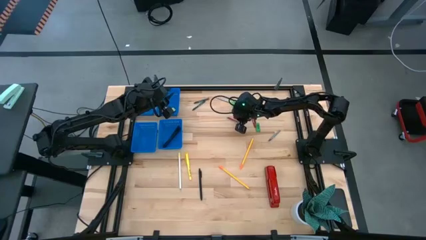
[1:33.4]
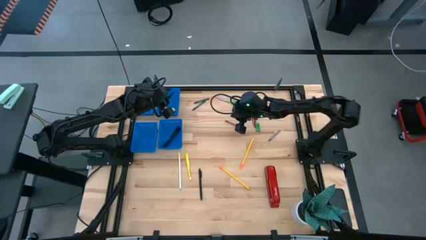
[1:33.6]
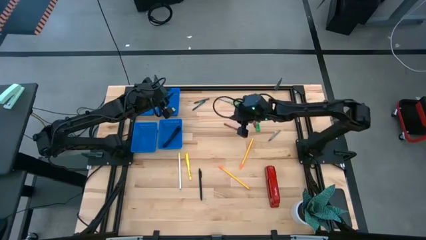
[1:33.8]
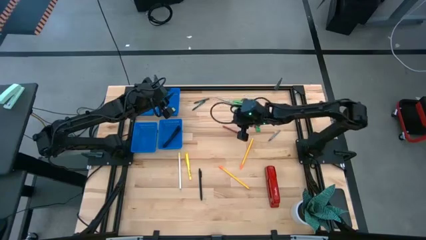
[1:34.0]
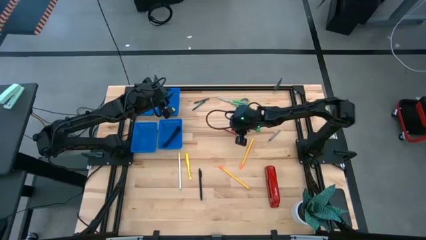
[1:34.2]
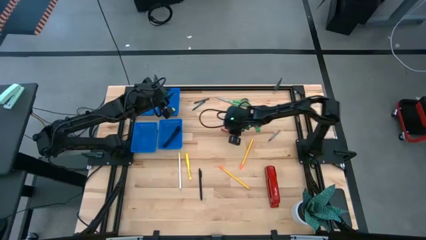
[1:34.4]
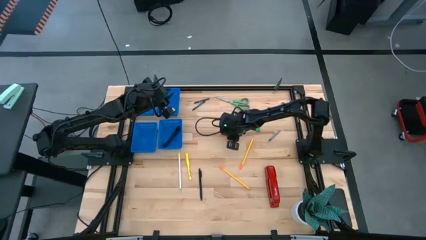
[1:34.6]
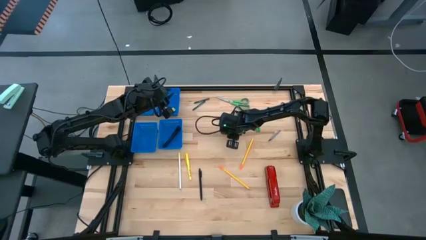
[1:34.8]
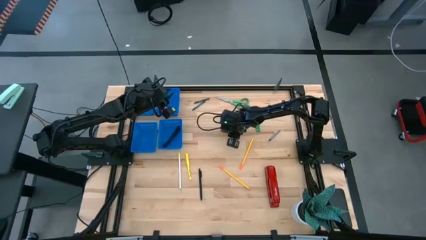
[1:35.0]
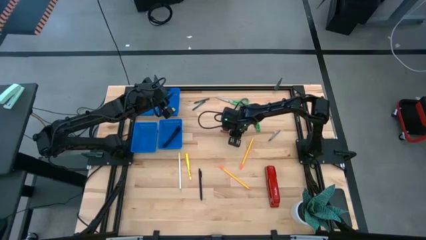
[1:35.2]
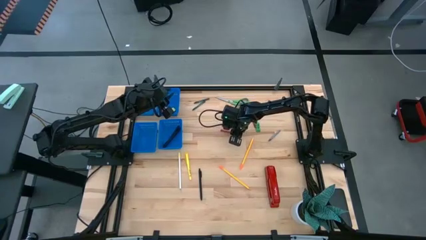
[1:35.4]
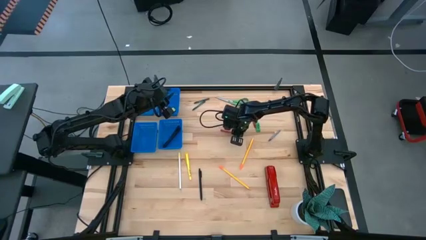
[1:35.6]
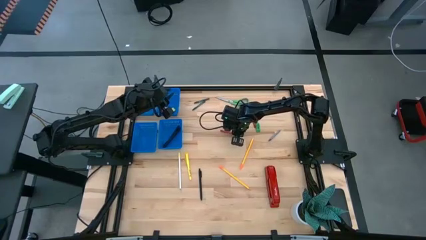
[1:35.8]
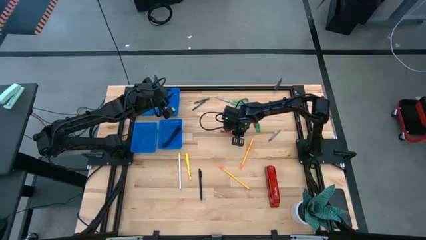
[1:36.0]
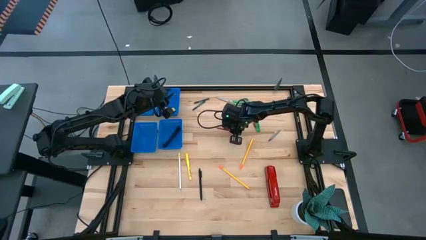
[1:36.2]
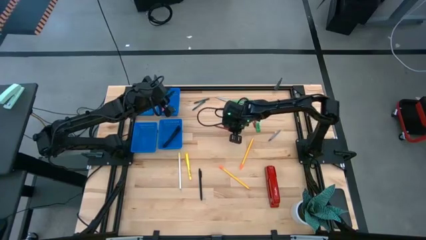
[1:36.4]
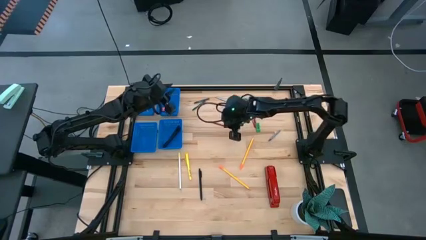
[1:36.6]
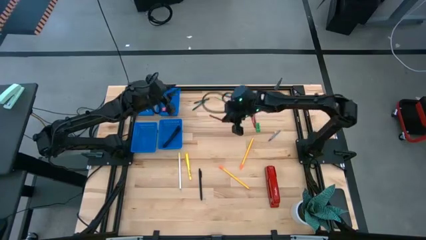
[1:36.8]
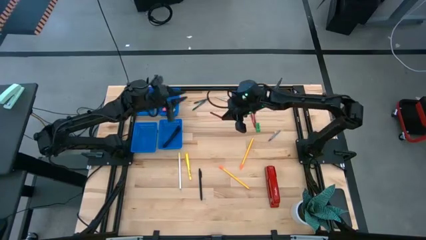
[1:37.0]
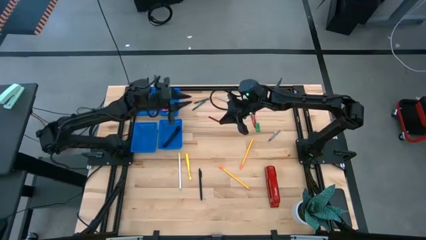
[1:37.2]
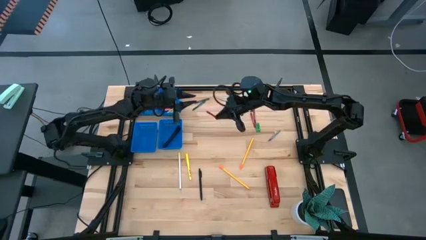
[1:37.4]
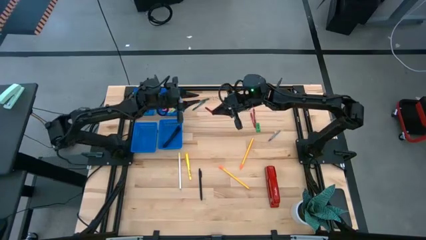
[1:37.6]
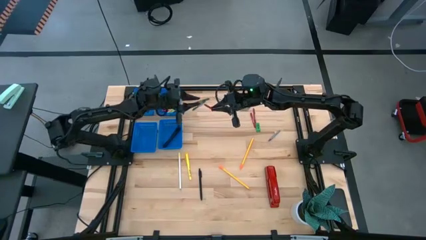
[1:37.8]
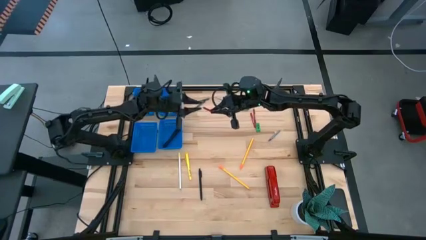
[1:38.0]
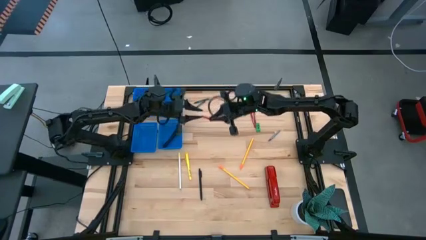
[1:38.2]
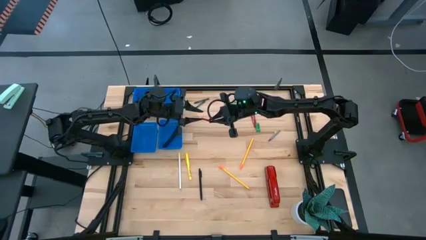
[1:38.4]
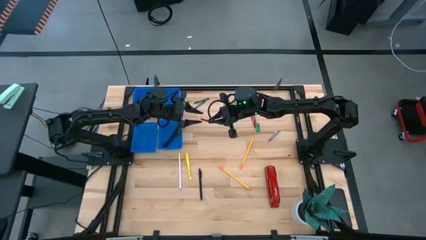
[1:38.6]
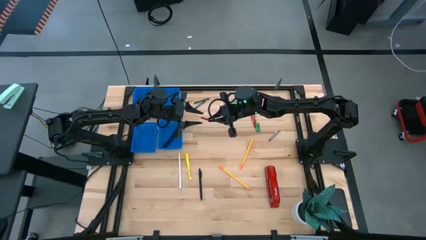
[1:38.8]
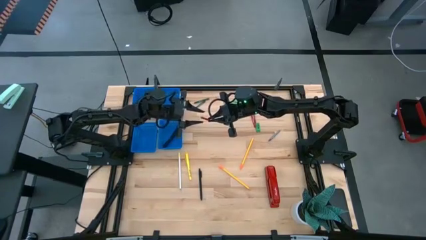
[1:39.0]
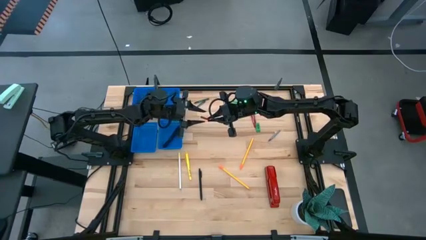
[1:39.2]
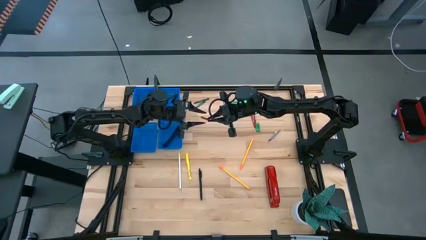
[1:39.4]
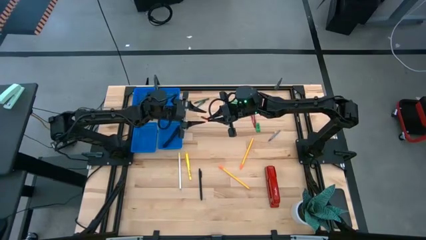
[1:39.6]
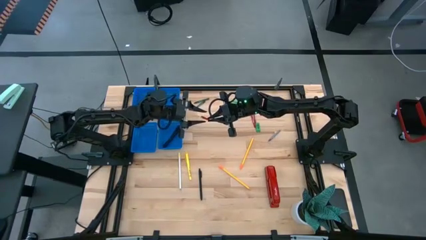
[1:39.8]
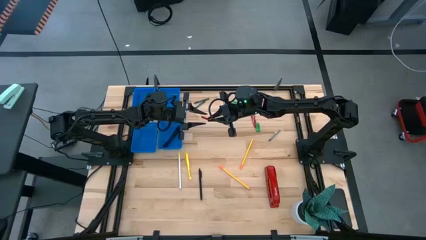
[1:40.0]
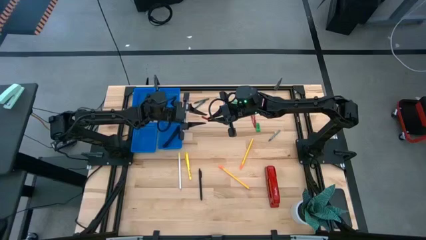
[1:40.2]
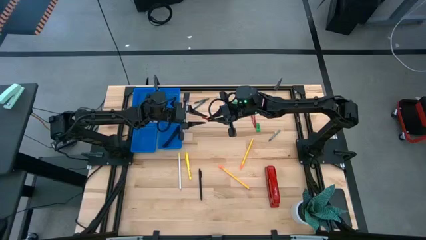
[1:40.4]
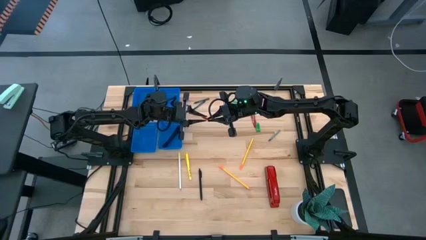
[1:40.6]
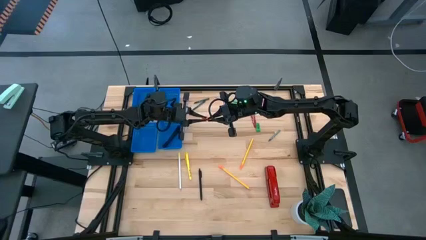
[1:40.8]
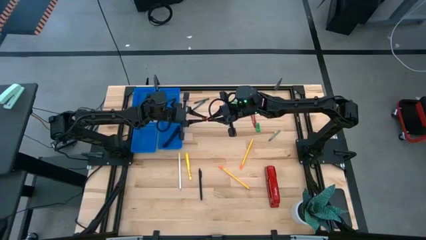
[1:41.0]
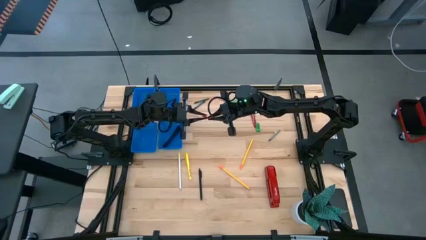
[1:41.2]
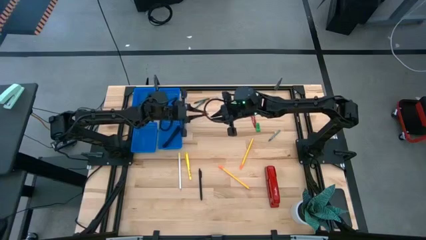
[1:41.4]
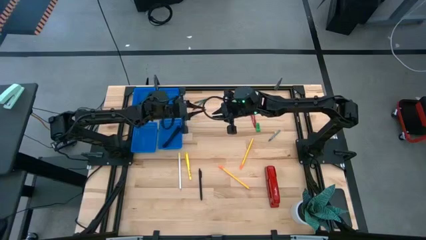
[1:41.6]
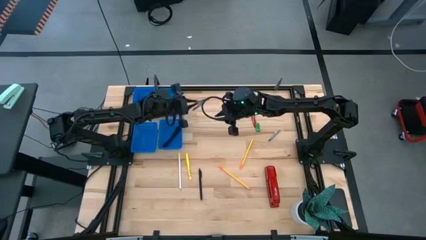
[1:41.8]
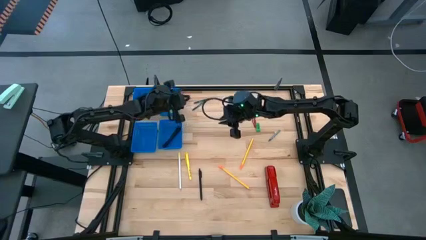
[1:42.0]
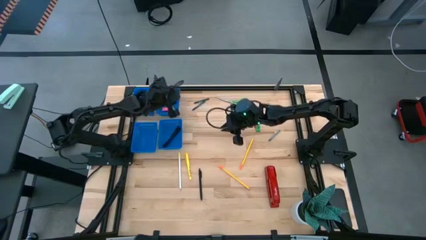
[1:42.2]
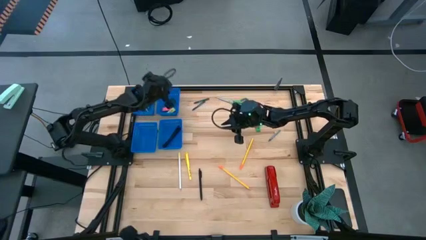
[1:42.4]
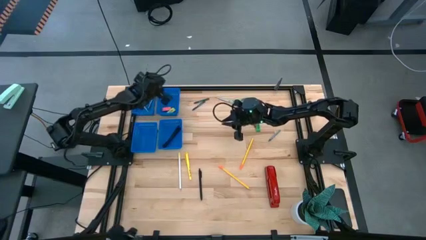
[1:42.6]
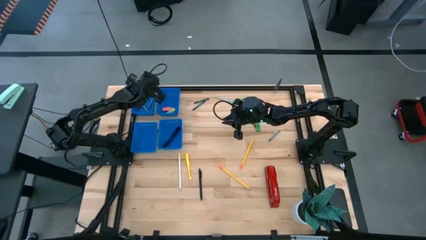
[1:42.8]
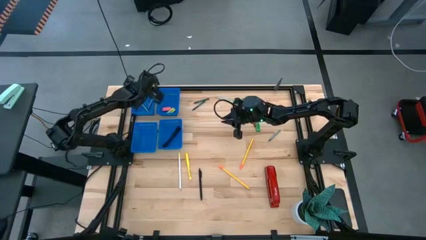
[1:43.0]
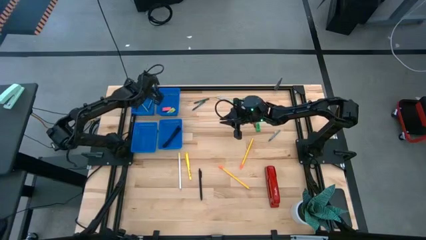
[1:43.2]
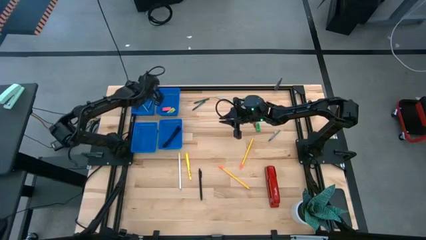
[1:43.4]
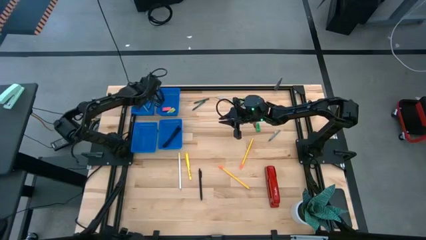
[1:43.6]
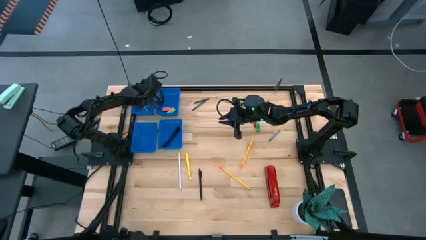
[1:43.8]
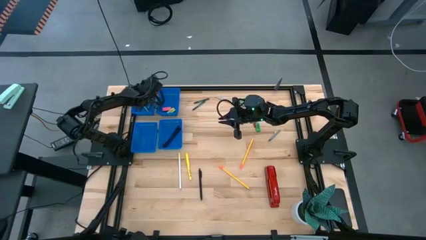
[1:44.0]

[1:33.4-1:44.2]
Task: Sort crayons/erasers/pens/pencils in bins
Put the red crayon into the top left blue bin

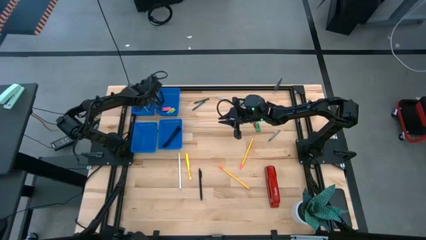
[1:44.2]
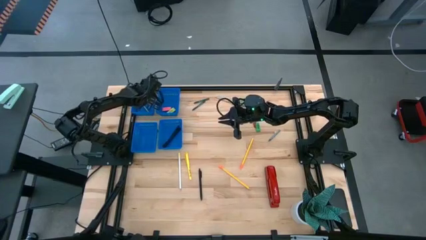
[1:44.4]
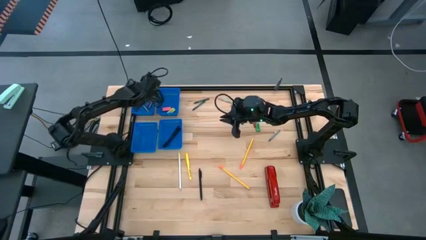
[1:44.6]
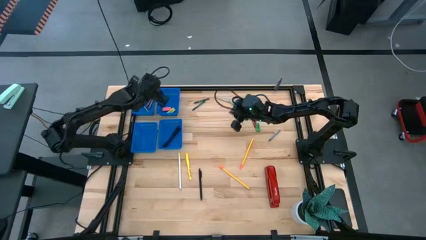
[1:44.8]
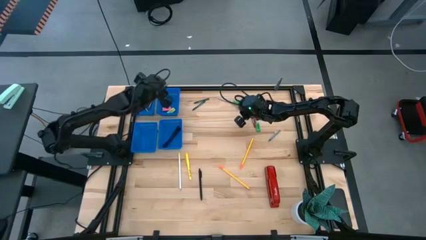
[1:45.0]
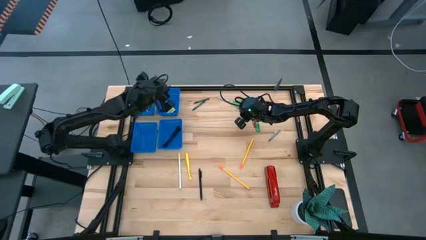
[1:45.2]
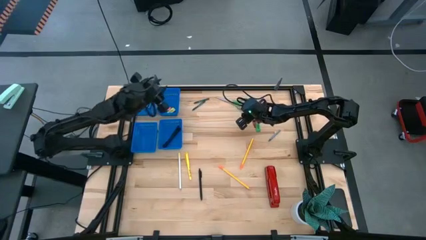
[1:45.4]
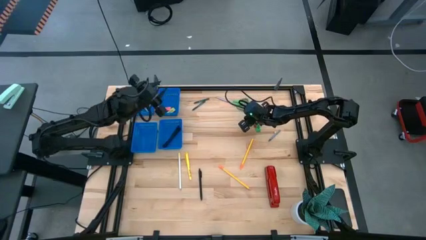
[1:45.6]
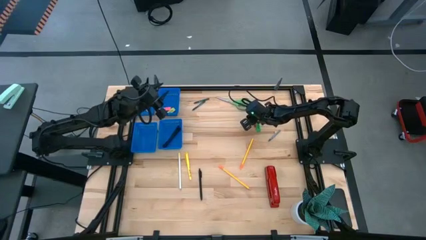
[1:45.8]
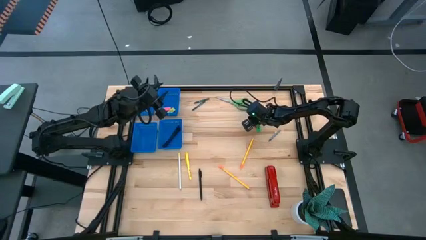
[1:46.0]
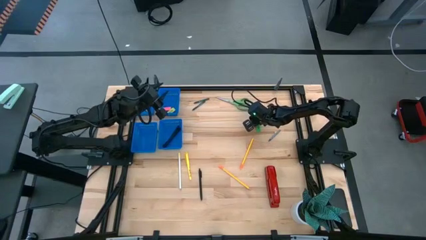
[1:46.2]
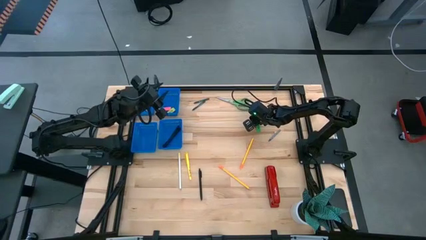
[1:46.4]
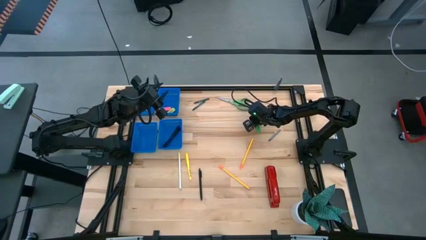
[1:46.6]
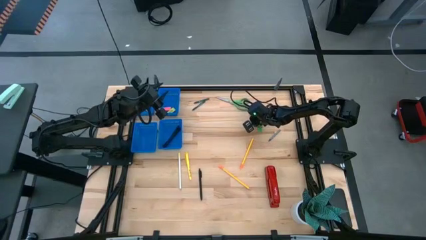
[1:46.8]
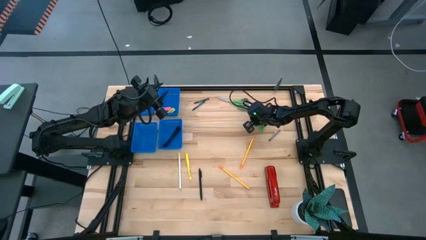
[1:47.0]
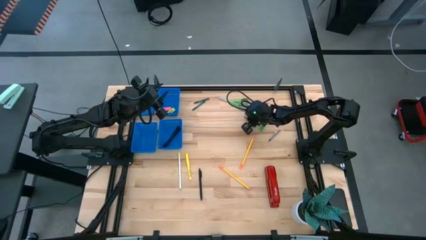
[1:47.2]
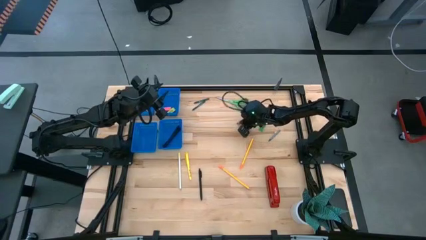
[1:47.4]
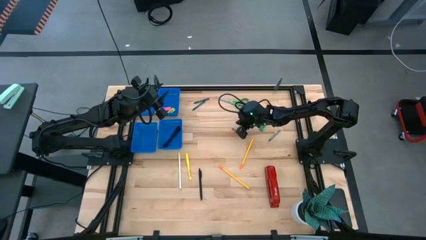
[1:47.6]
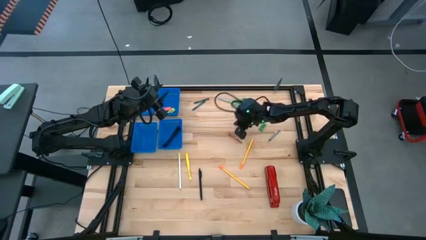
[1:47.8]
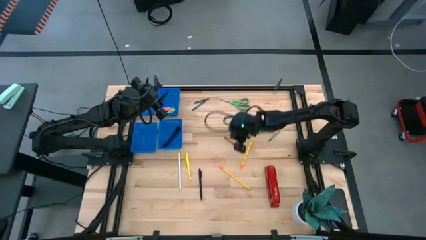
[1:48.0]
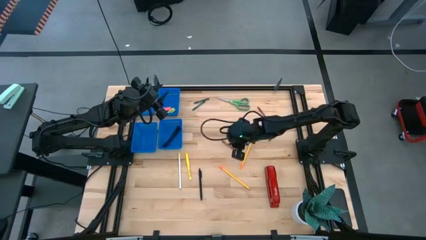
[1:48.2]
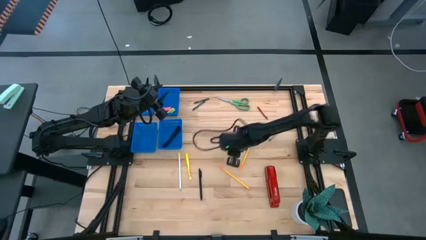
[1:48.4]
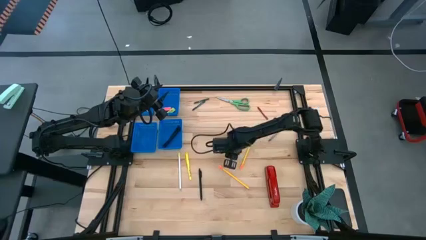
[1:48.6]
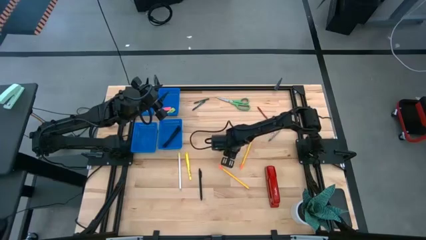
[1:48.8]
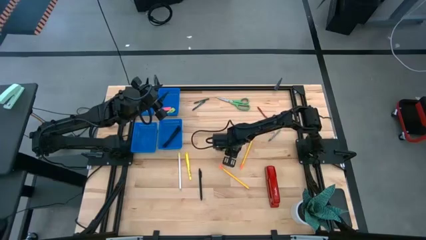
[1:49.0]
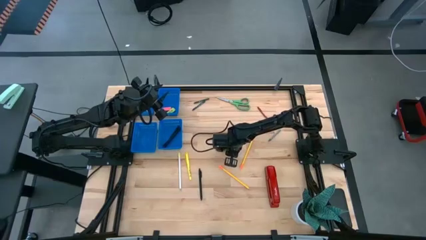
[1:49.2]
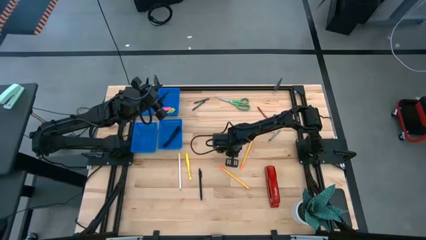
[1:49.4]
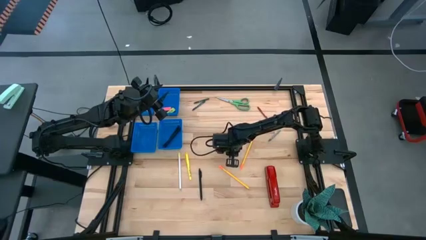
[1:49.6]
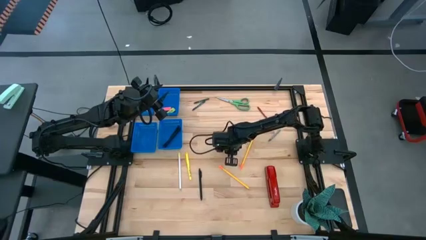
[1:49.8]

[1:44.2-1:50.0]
Put the red crayon into the top left blue bin
